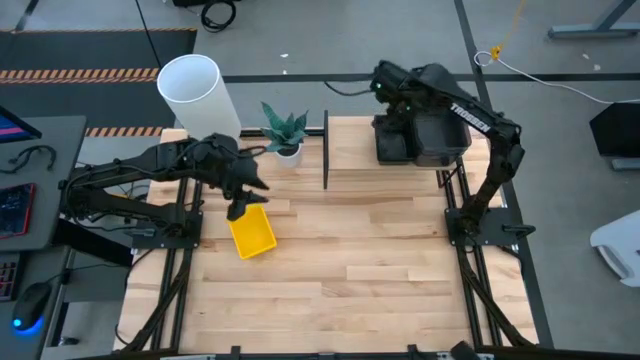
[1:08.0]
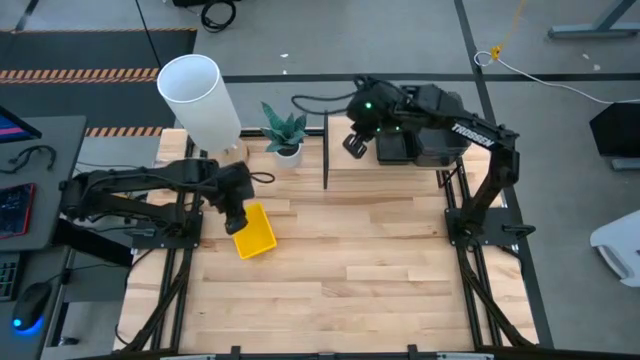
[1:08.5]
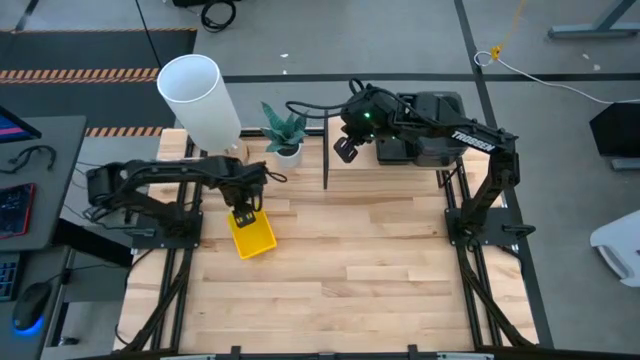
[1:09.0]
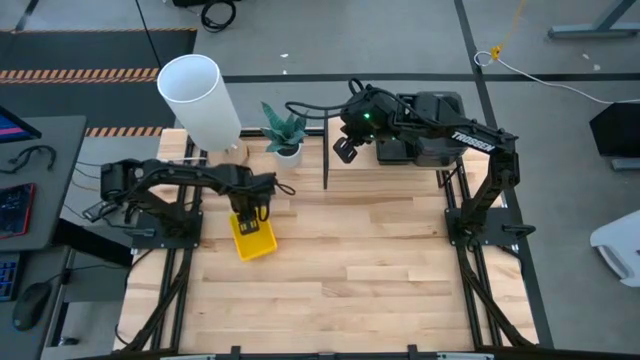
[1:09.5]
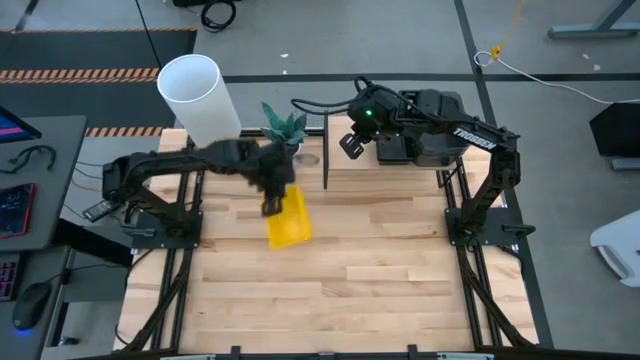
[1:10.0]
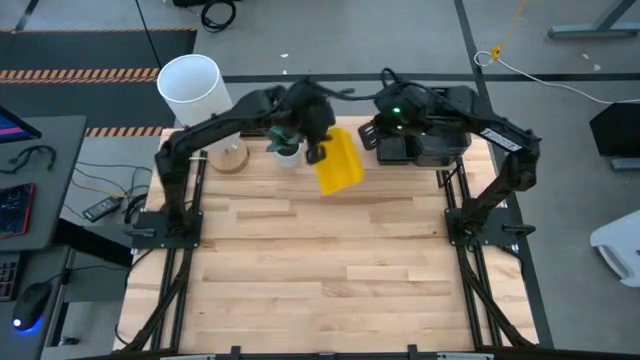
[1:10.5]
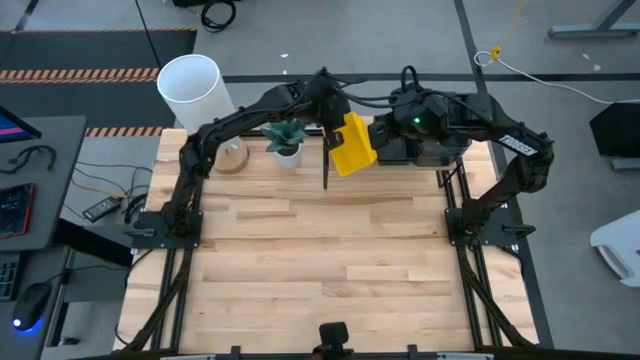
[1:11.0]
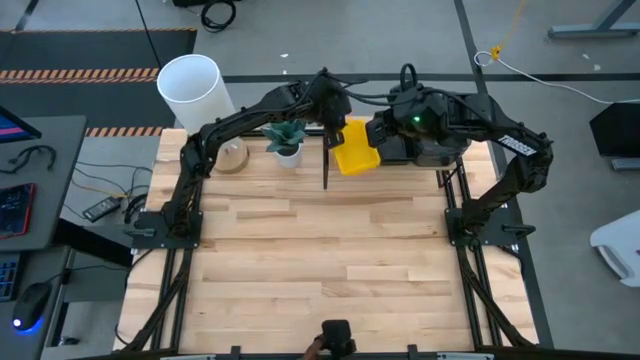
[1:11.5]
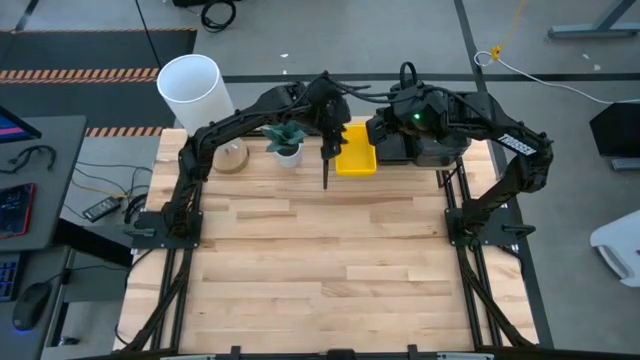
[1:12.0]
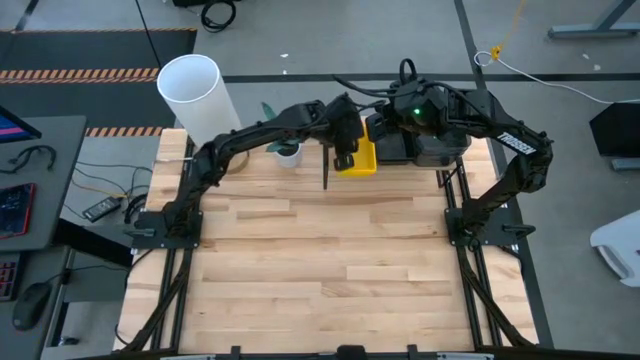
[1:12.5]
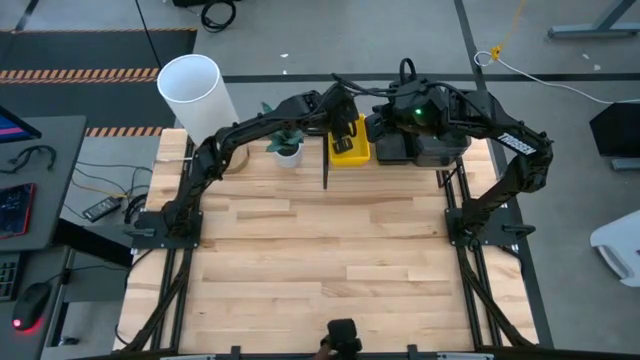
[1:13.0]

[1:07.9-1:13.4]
Task: Stack baskets on shelf by color
Put the stacked yellow bins on the shelf

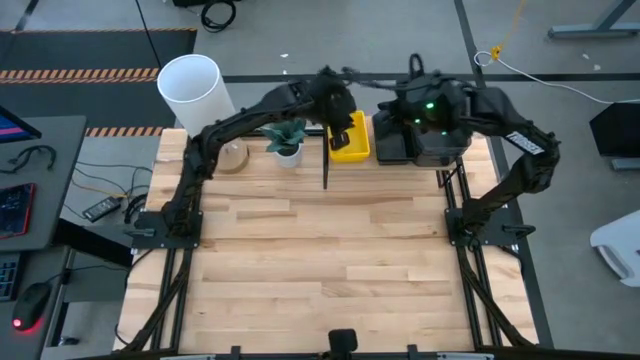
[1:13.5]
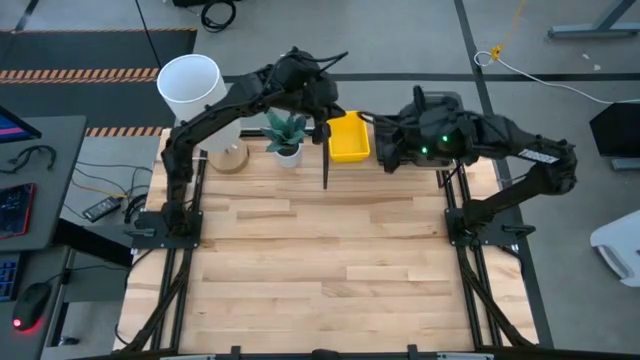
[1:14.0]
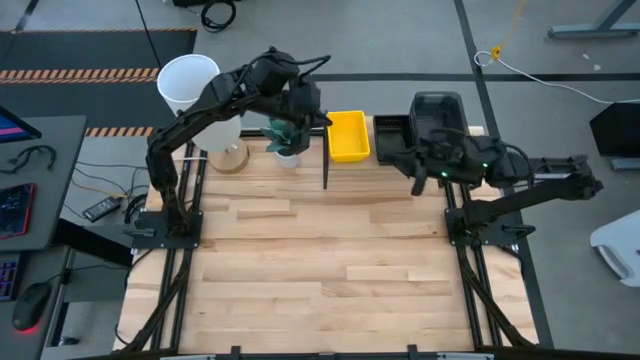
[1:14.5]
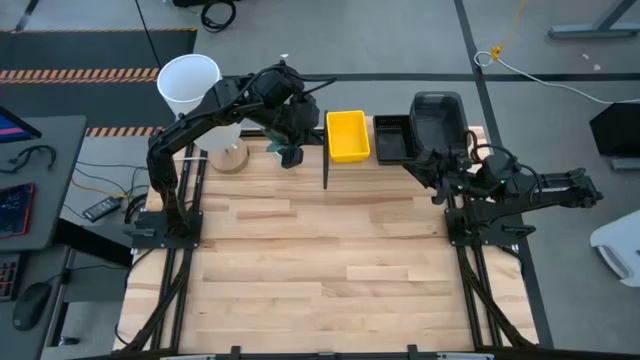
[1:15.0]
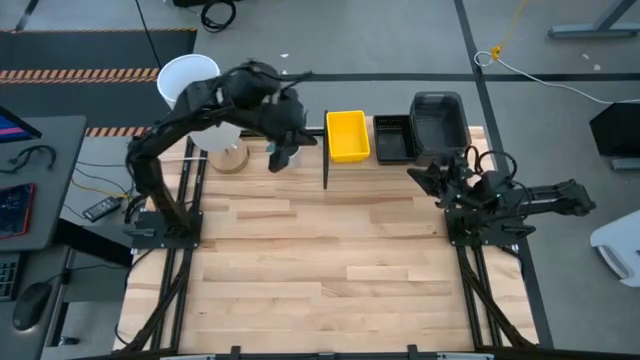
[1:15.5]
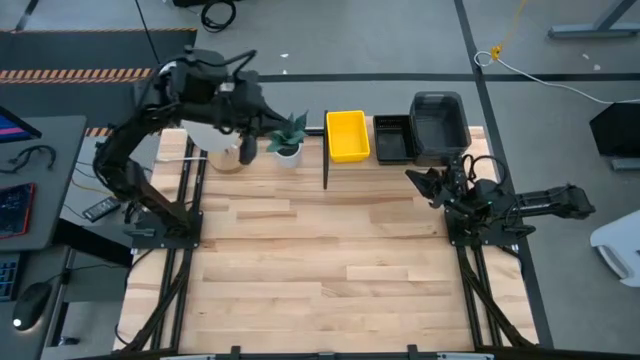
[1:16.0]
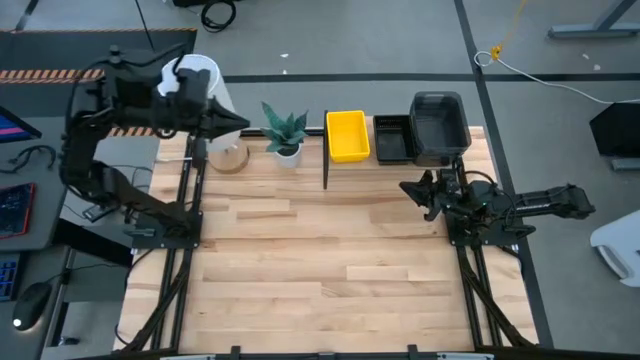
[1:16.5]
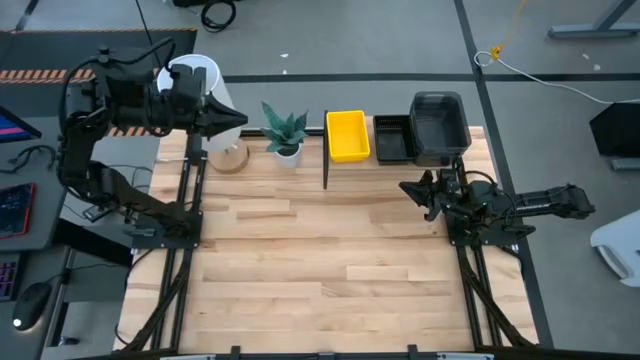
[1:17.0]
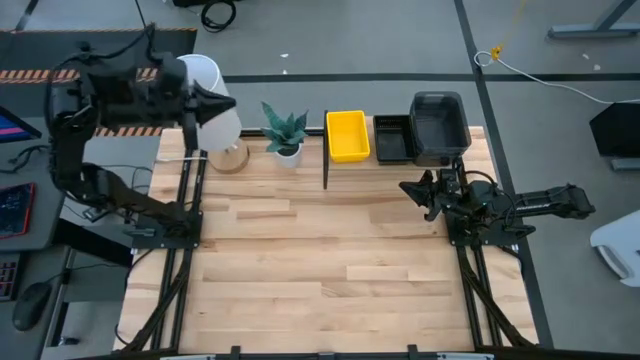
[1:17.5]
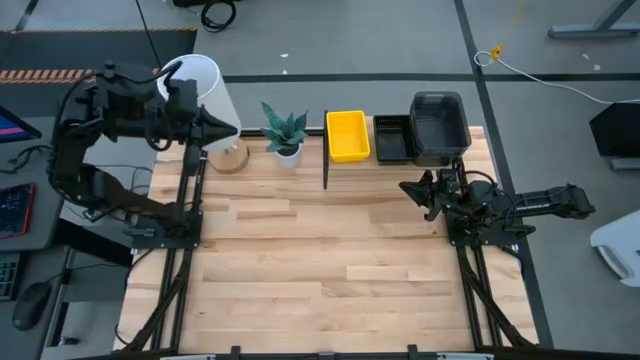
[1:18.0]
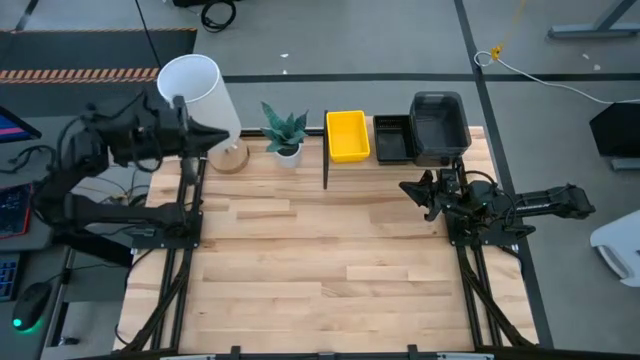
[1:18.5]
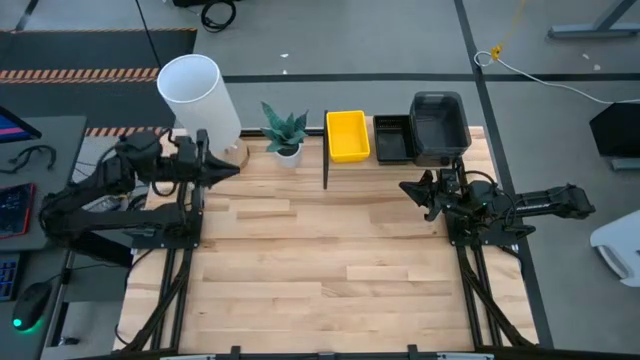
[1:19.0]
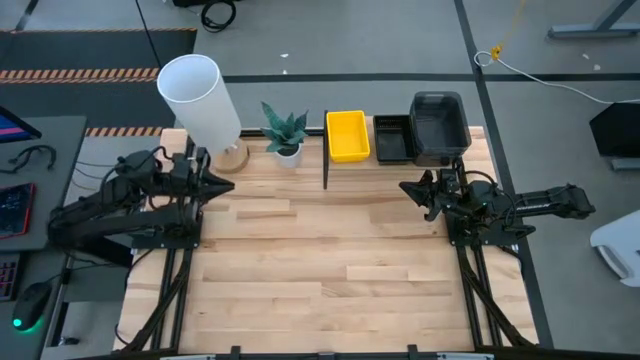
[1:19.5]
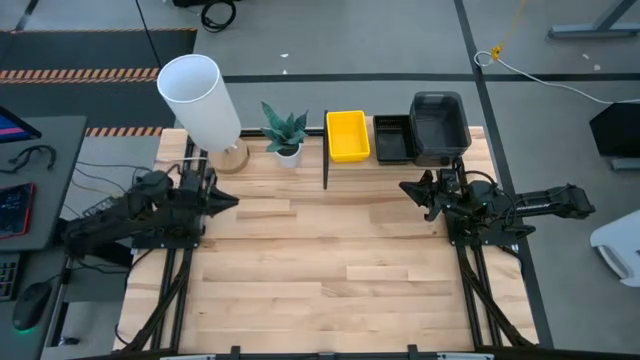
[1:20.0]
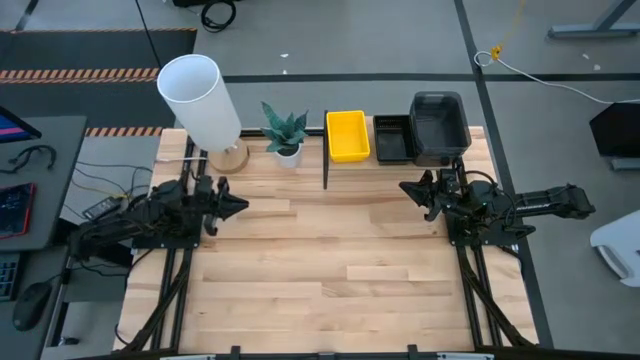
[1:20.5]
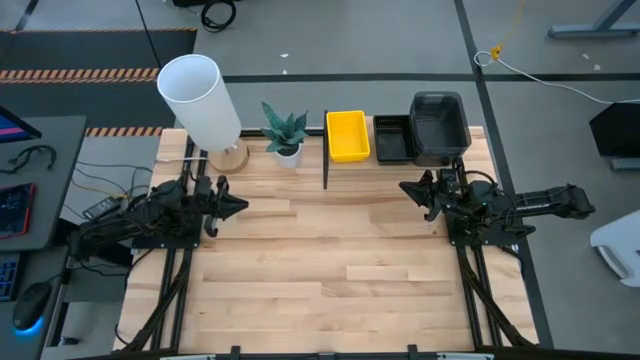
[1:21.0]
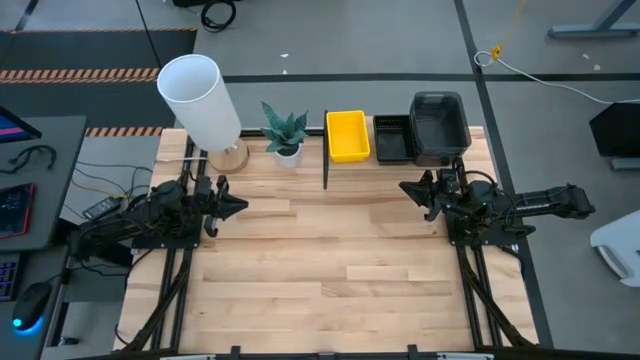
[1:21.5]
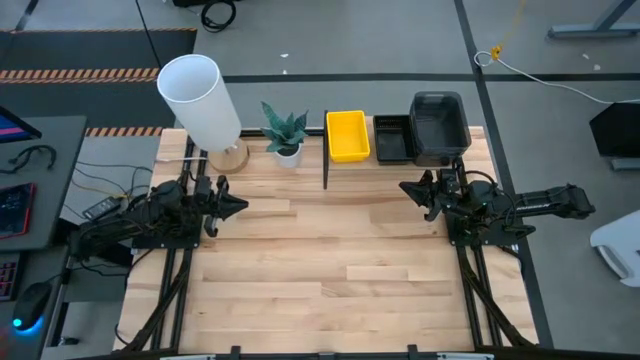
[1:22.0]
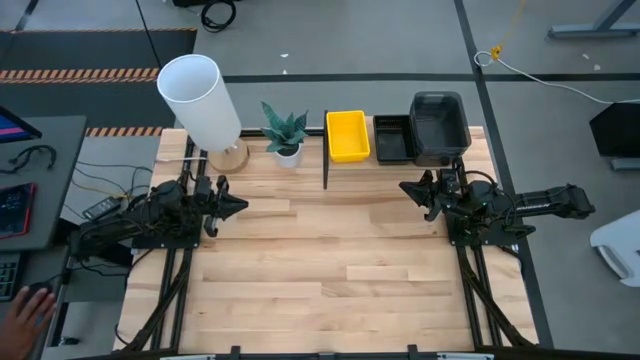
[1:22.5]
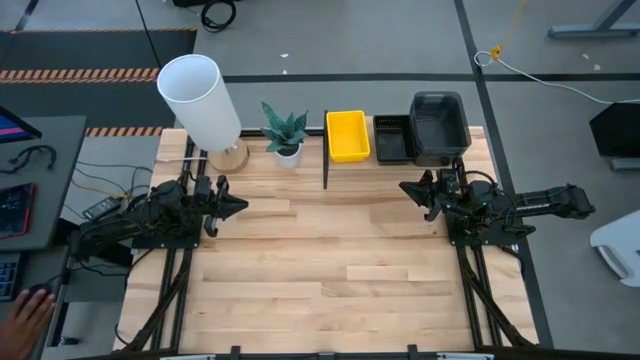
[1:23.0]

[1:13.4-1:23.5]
Return to Home Position

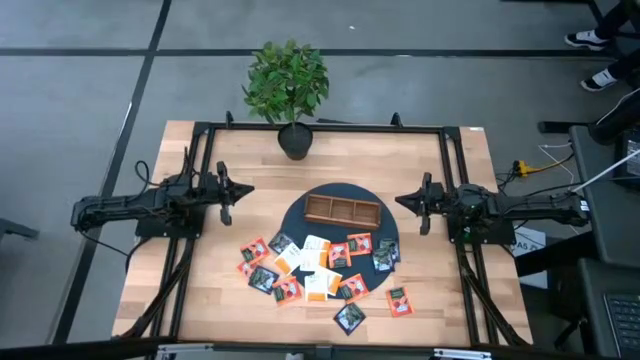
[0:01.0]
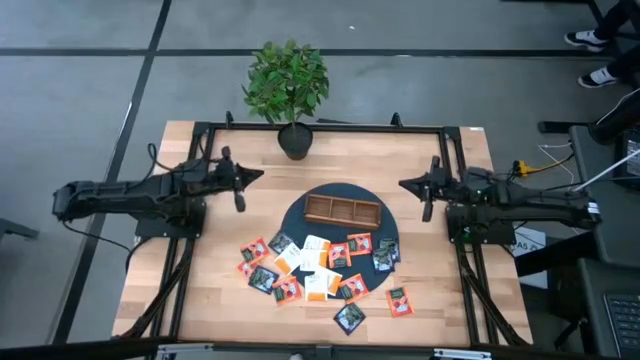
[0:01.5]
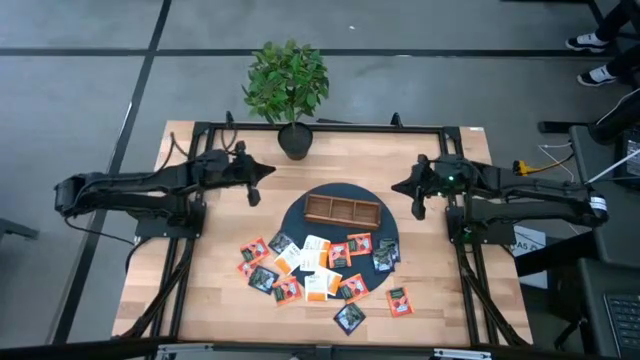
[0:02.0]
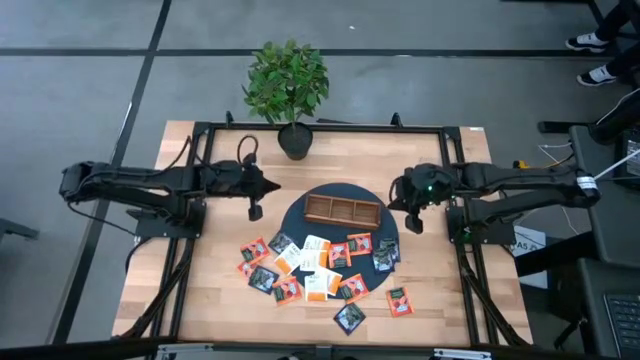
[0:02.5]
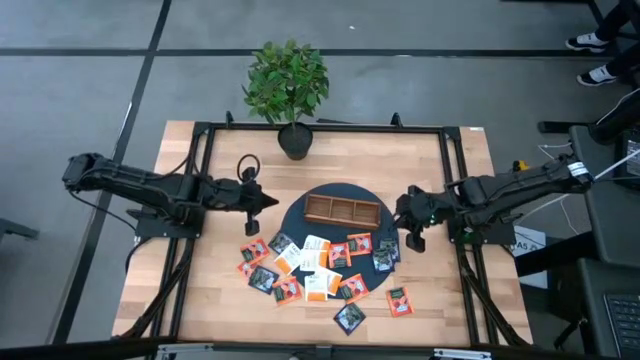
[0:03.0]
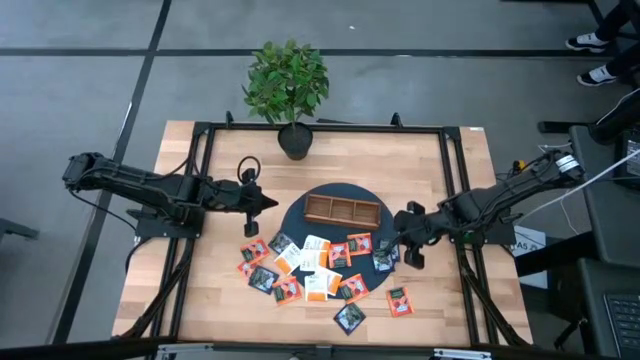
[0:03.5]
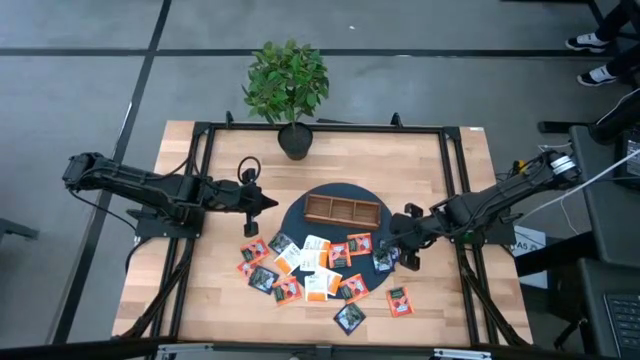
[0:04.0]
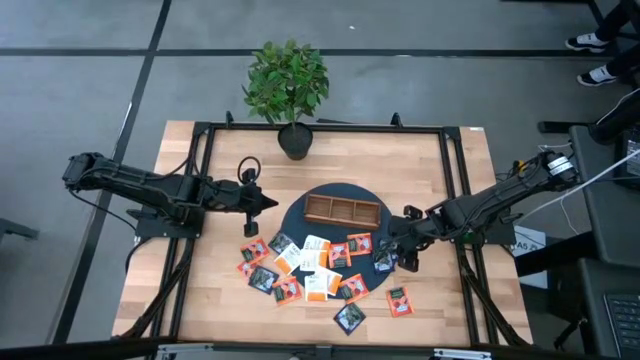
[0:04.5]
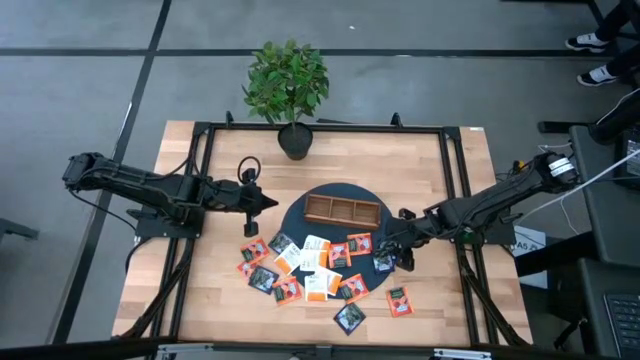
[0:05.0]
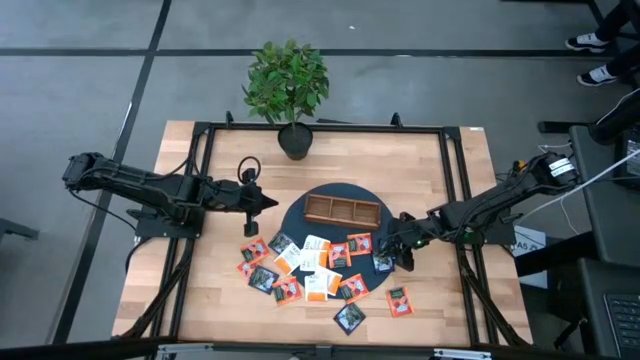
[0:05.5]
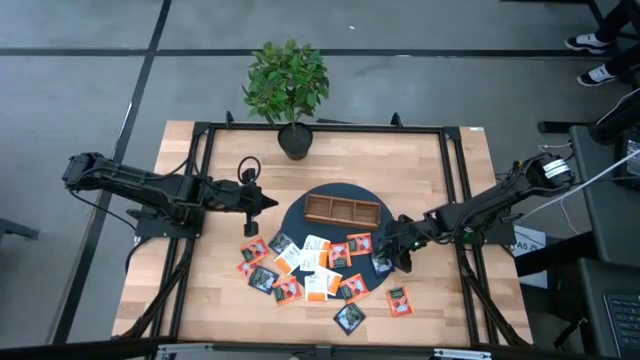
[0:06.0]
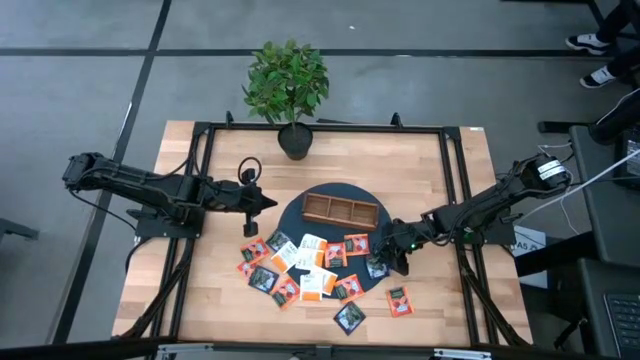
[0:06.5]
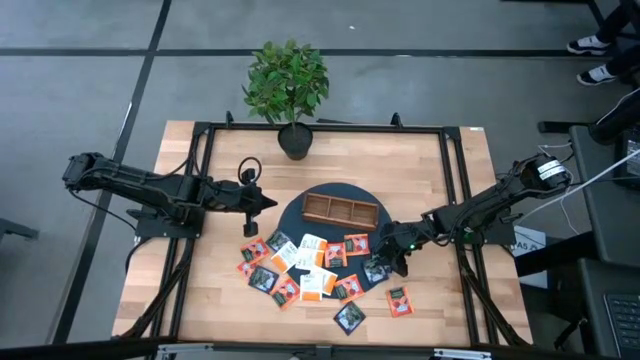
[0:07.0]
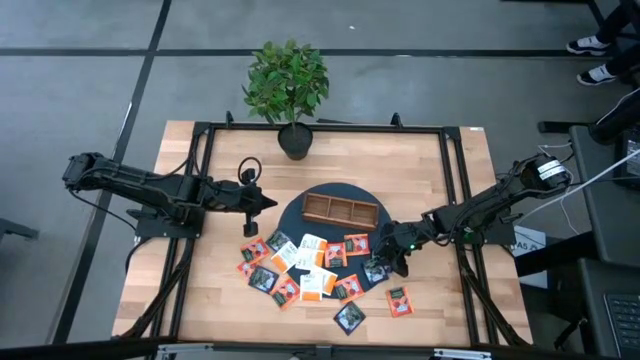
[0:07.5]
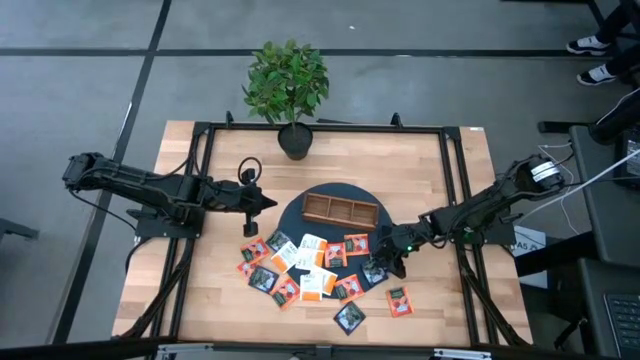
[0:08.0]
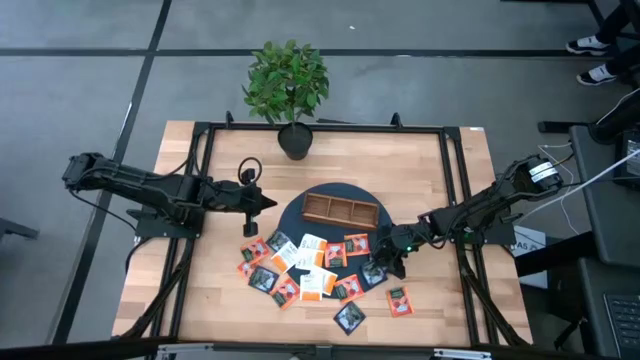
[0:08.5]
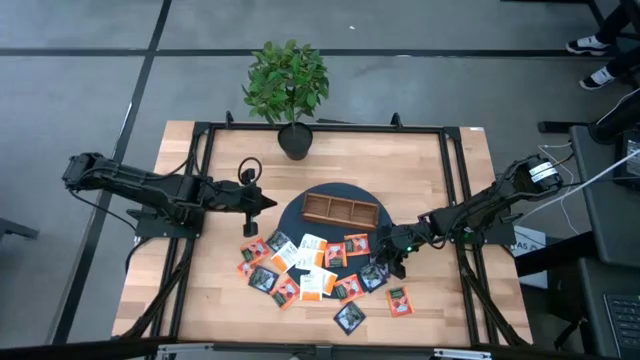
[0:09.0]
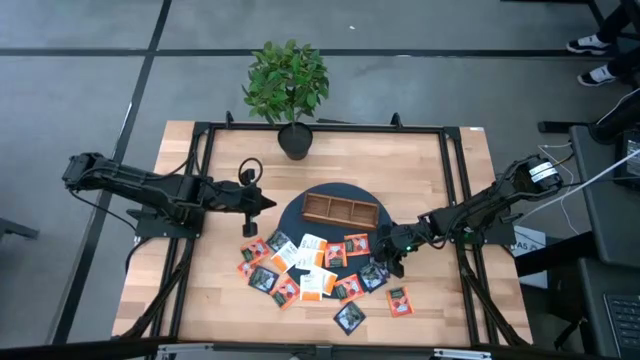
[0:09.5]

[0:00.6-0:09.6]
Task: Pick & Place Tea
Put the violet tea bag into the right side of the wooden organizer
